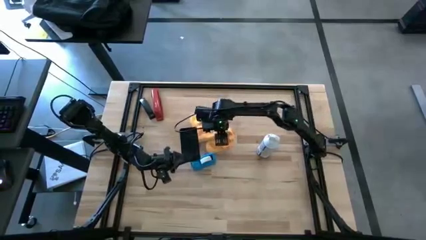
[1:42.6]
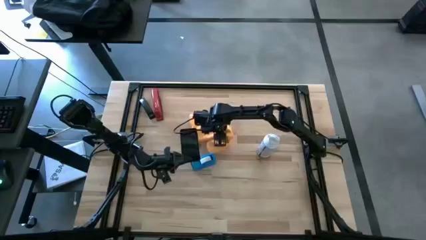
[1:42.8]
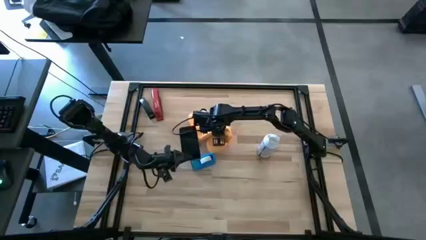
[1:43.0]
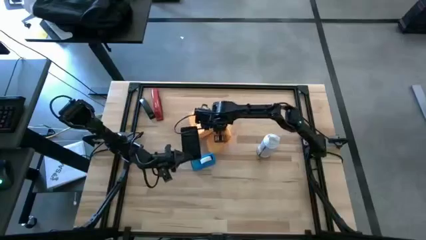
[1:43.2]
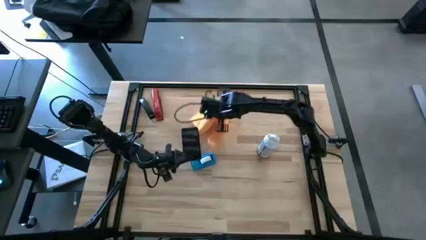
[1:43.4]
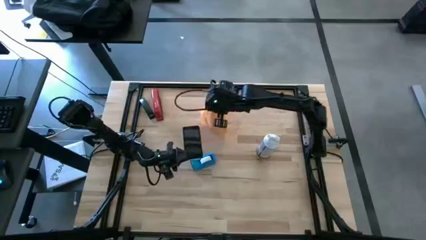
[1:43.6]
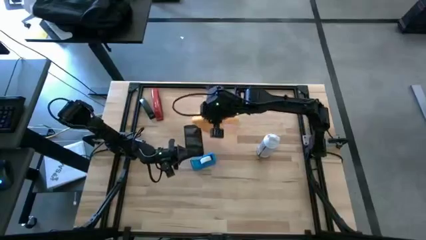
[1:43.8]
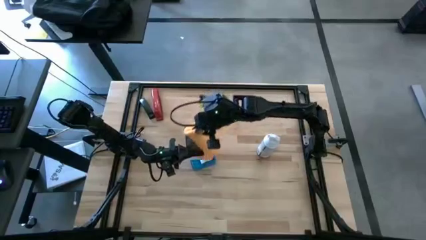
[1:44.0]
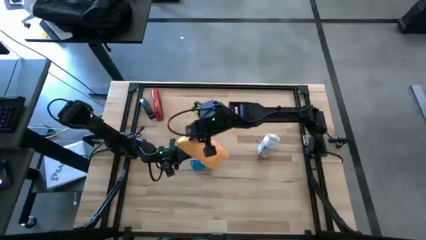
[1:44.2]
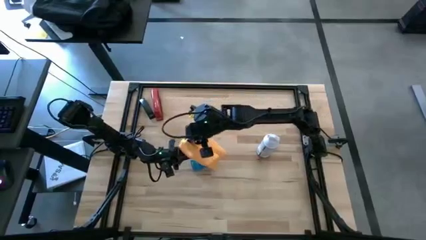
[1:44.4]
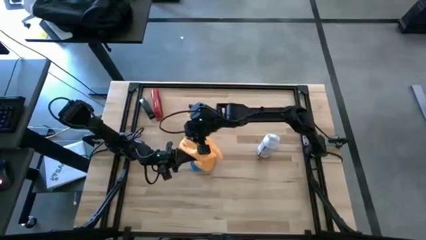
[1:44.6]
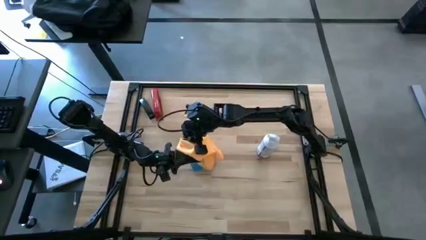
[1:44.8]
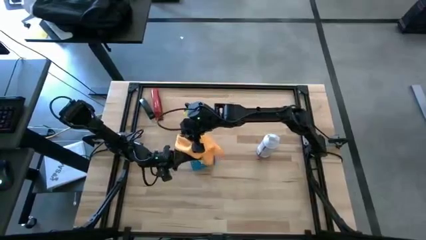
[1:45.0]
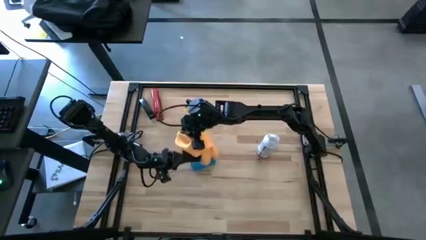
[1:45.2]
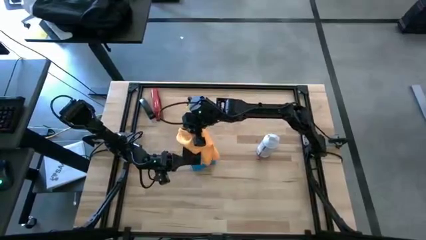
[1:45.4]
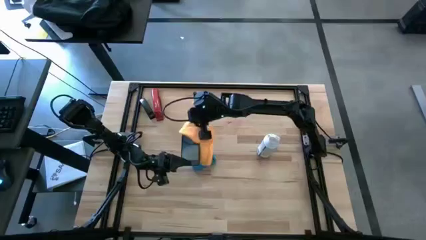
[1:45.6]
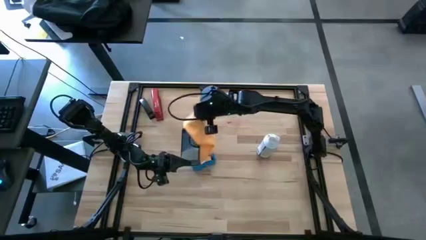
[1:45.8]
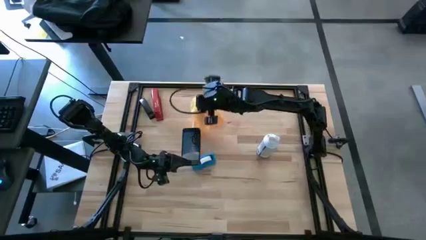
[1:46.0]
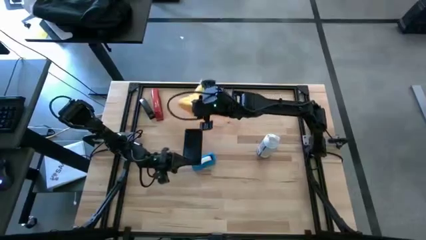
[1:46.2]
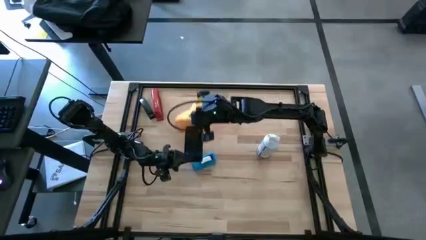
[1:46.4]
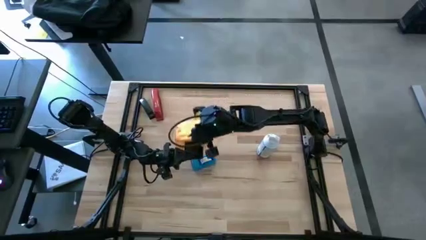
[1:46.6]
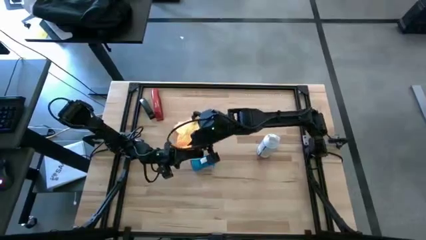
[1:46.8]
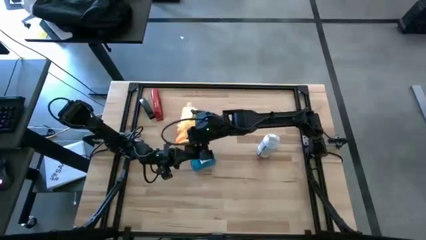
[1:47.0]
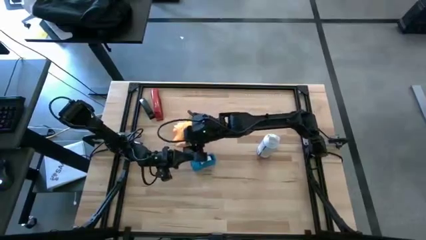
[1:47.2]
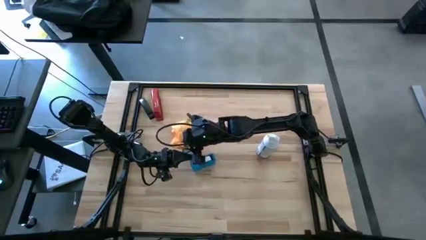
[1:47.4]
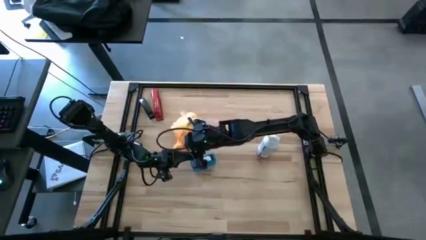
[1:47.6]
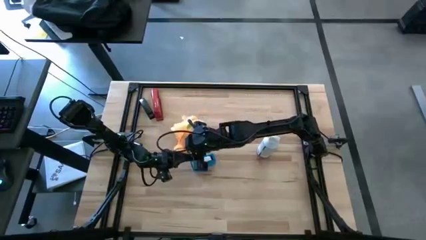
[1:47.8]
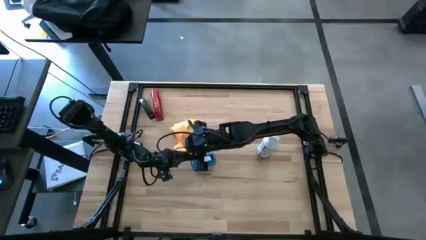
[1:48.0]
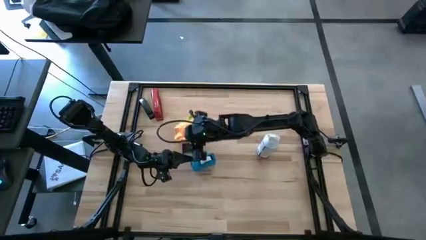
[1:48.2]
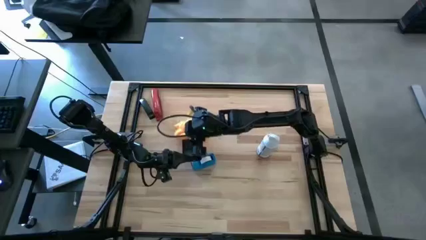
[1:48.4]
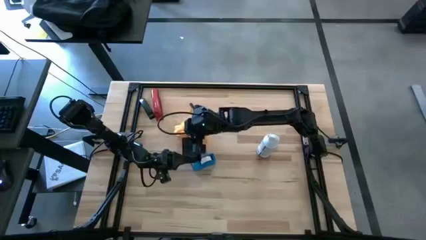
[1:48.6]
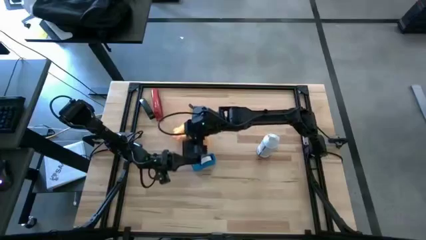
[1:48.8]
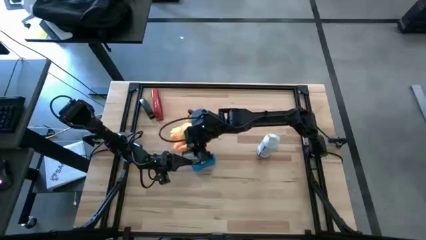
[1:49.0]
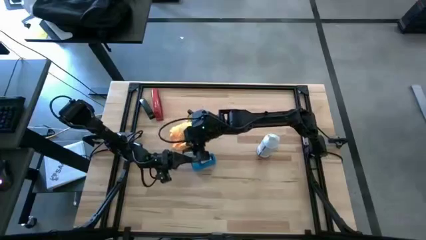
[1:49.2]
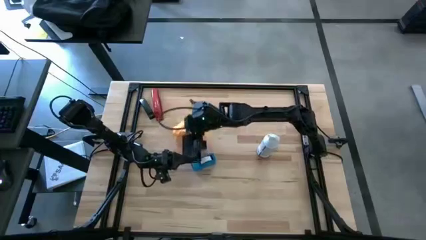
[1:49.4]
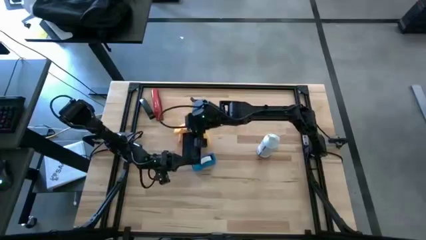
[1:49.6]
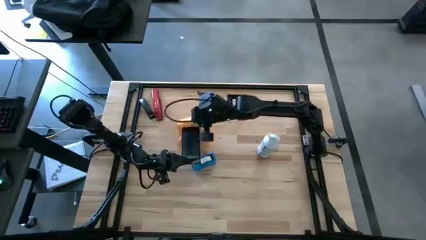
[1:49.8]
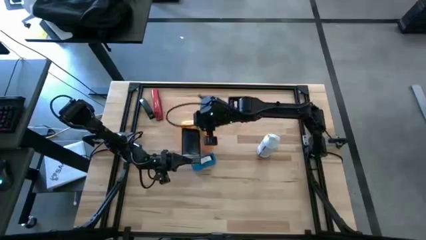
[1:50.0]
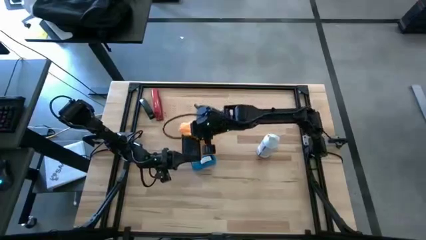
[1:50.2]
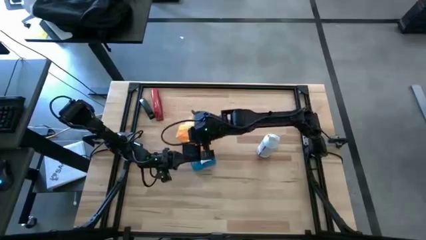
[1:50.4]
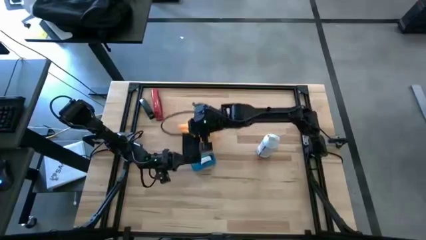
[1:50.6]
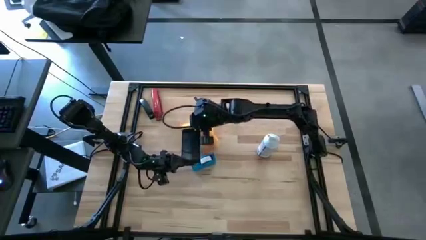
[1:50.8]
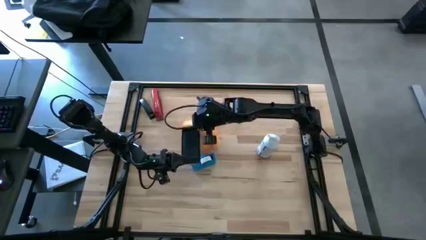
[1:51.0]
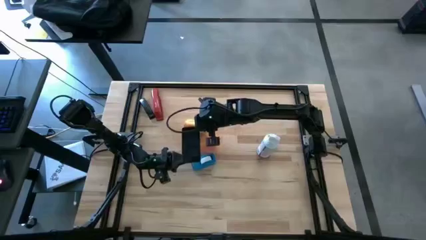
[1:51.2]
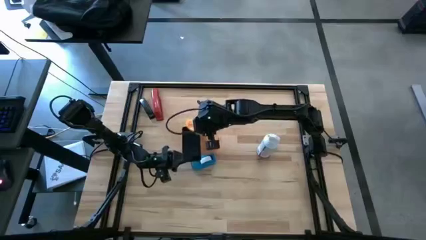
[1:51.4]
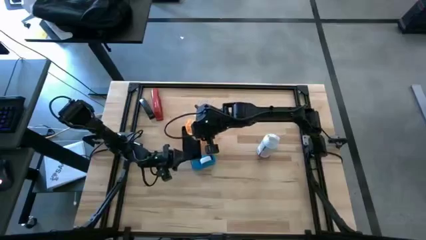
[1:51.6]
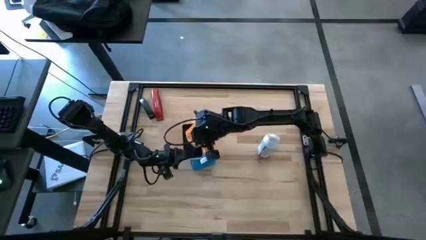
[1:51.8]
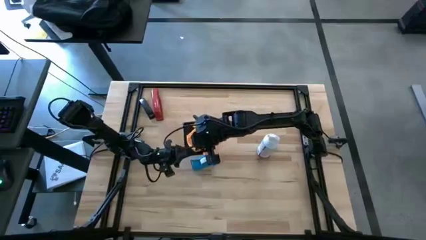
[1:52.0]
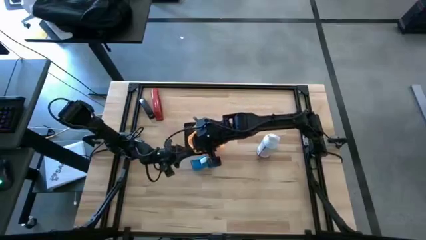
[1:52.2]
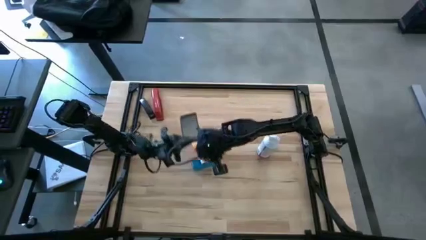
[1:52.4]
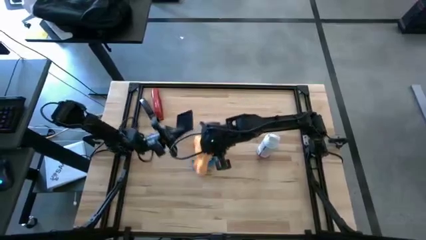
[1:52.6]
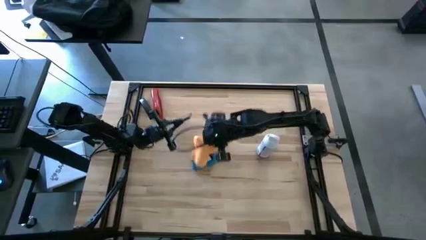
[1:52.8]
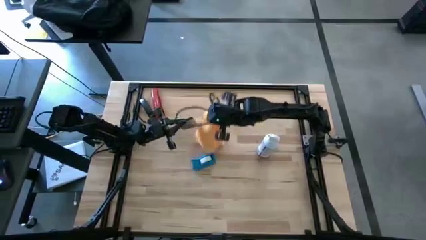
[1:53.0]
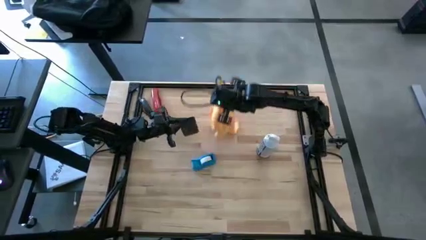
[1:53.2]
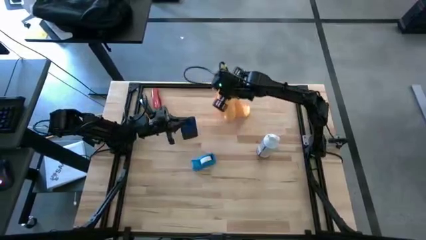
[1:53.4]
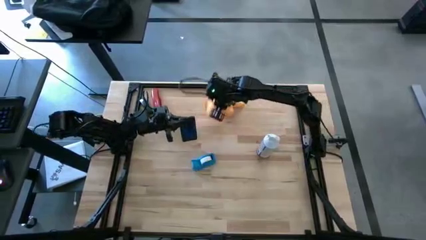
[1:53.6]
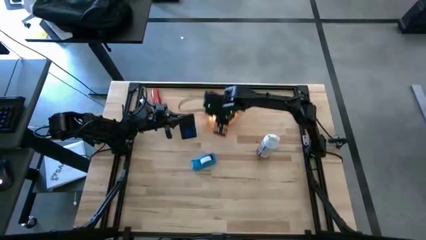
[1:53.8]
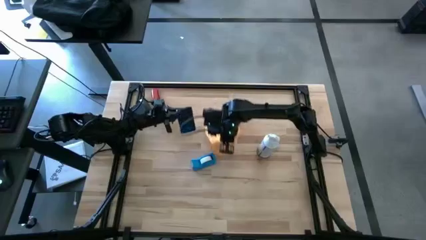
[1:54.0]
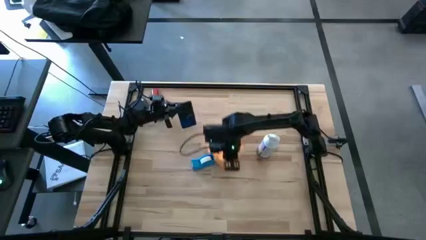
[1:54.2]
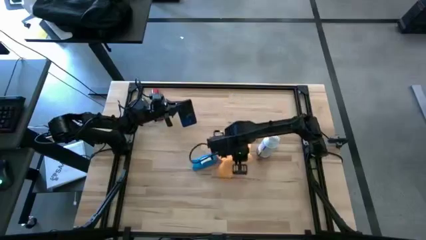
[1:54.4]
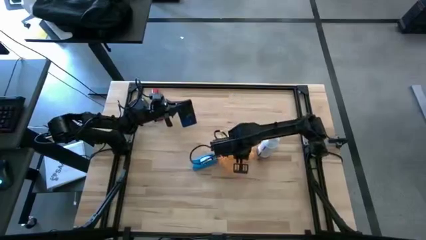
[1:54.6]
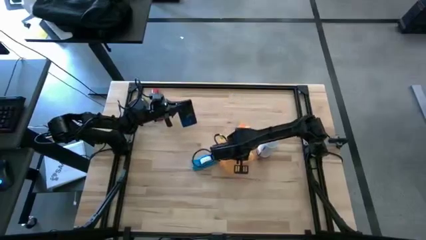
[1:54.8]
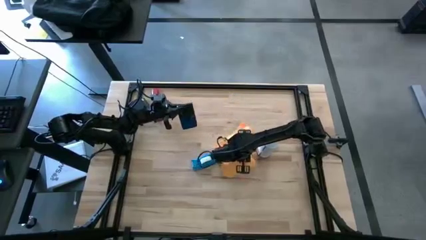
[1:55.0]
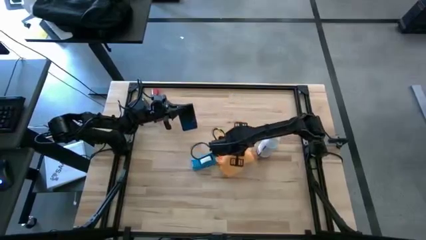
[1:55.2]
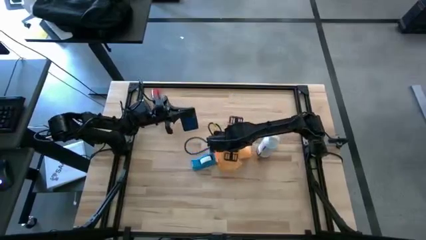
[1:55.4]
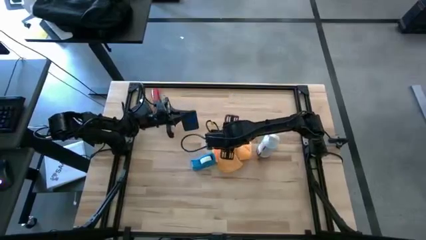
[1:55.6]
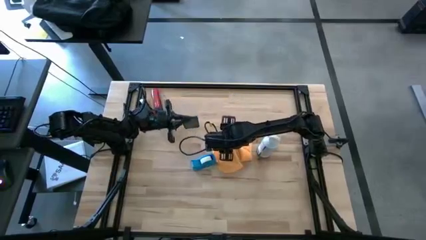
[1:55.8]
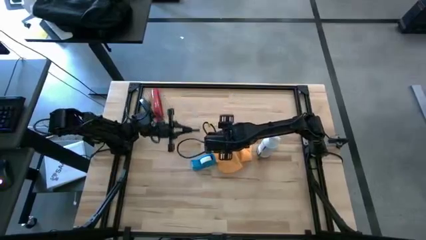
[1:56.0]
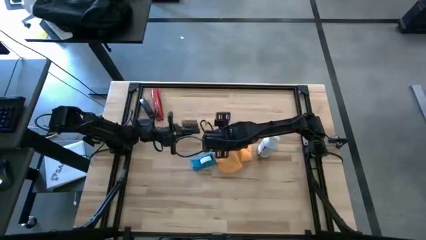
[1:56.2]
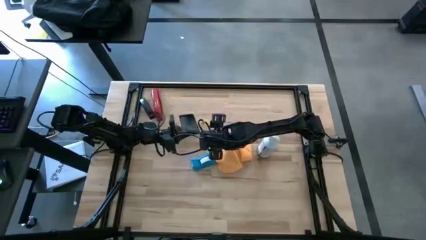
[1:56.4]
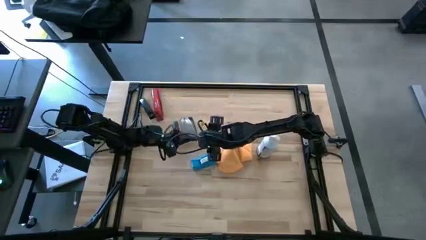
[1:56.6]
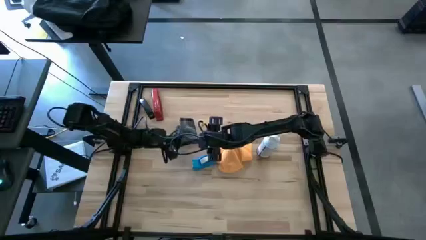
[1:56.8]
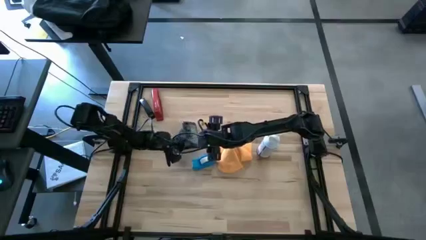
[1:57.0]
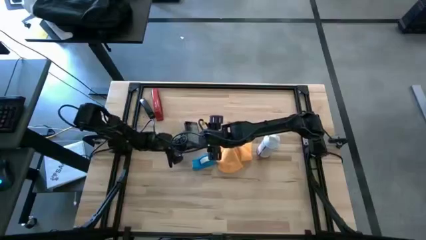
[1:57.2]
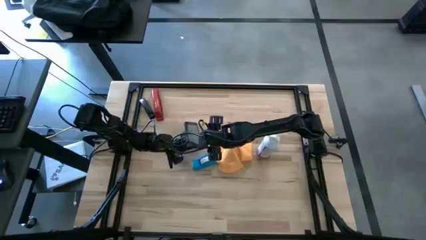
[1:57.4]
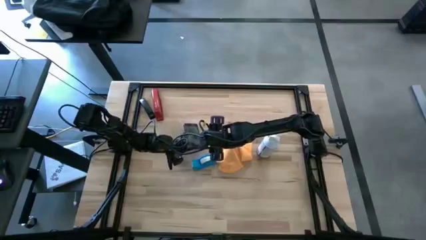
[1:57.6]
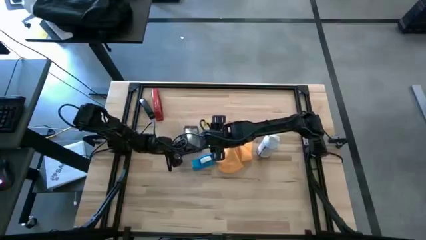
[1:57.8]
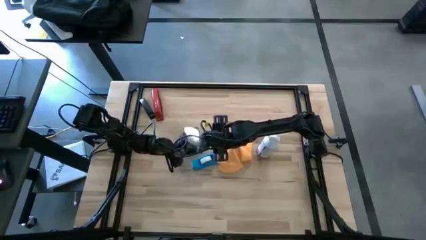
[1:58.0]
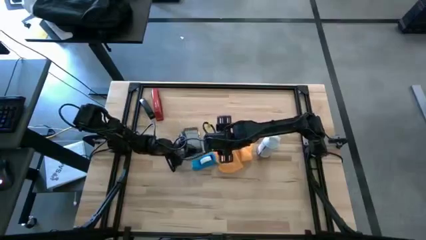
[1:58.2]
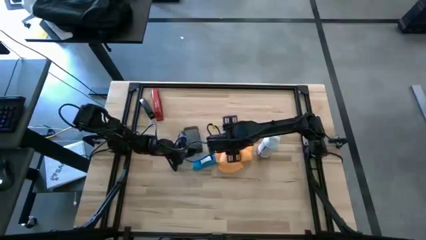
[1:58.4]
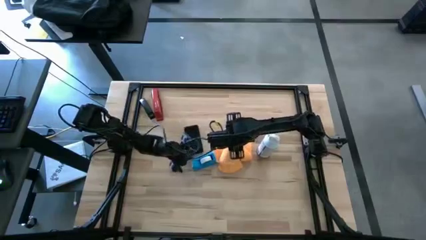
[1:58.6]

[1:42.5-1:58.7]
Task: Apply microfiber cloth
Wipe the front of the cellphone with an orange microfiber cloth

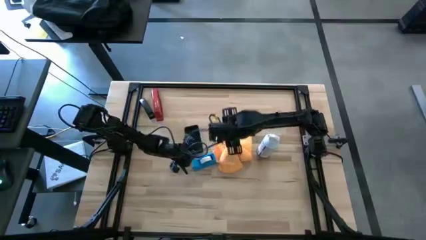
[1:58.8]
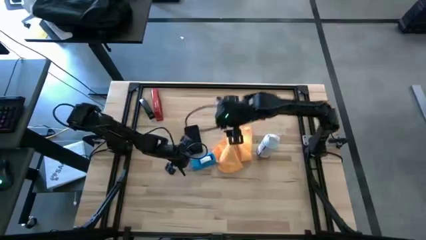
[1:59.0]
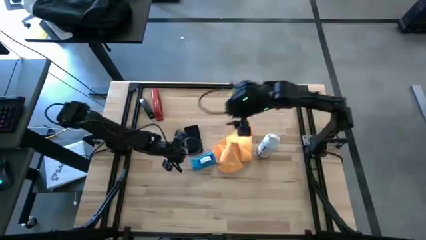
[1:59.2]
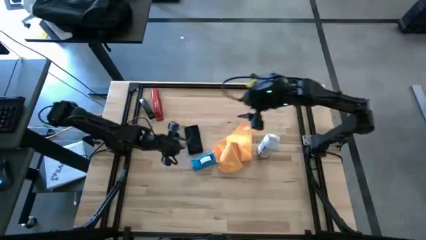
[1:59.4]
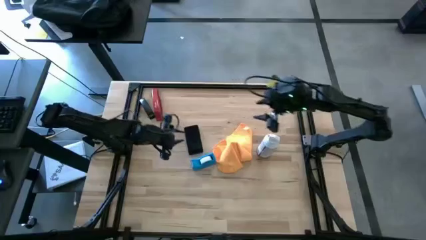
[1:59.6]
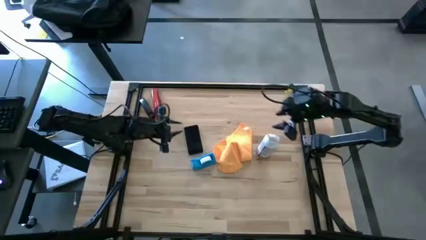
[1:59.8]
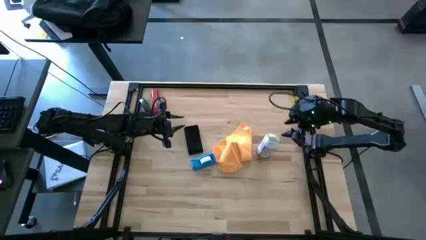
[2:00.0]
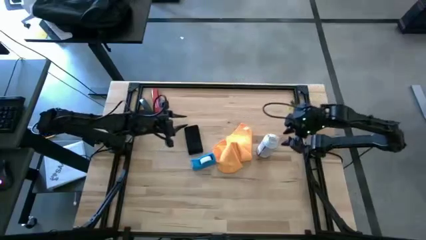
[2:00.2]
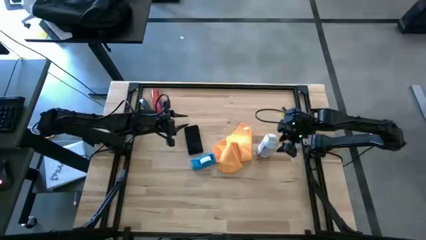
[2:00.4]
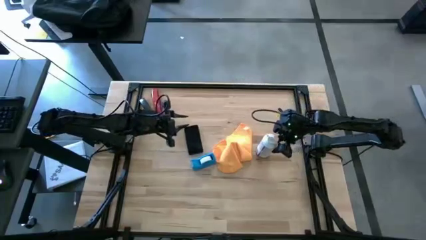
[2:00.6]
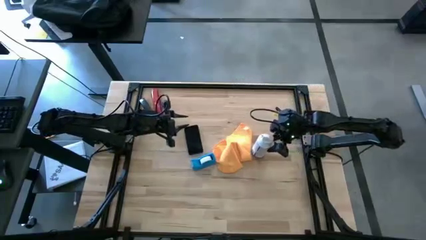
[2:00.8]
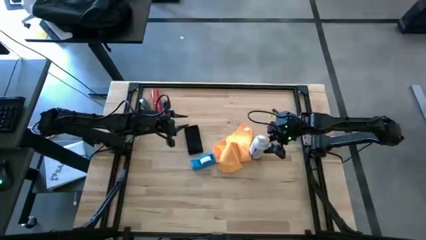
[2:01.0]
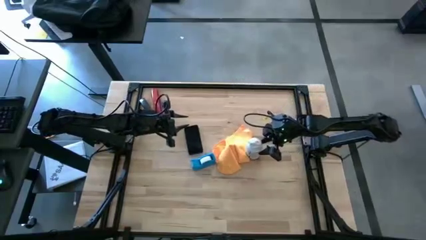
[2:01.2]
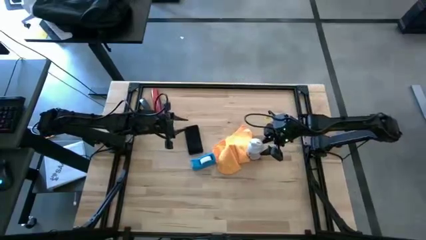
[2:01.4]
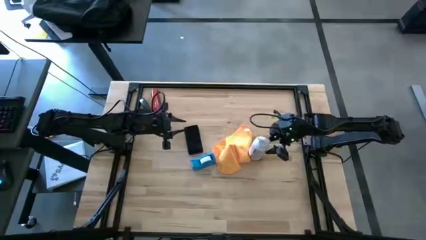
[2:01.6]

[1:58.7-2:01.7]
Adjust the white spray bottle
